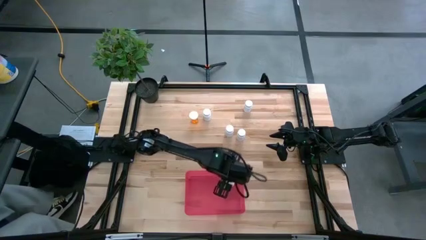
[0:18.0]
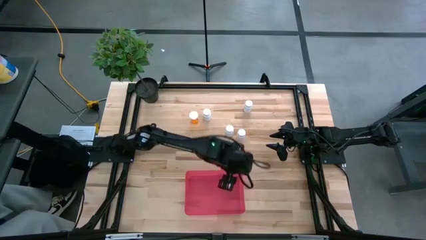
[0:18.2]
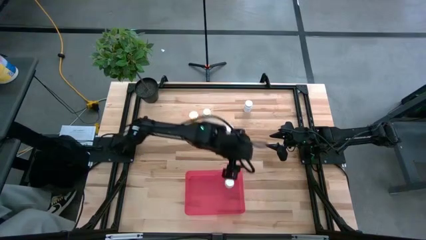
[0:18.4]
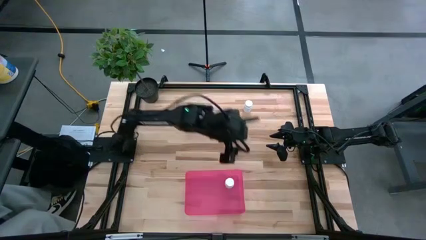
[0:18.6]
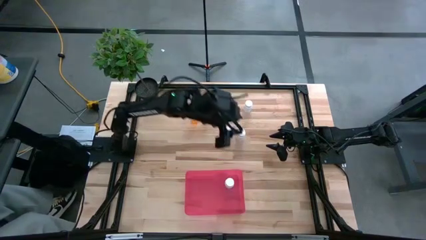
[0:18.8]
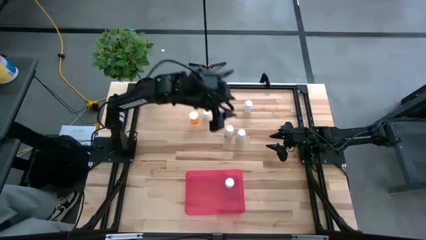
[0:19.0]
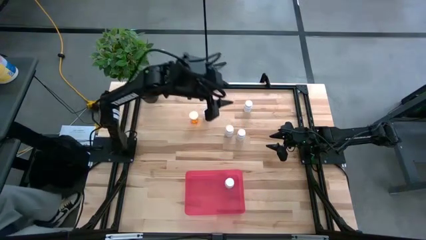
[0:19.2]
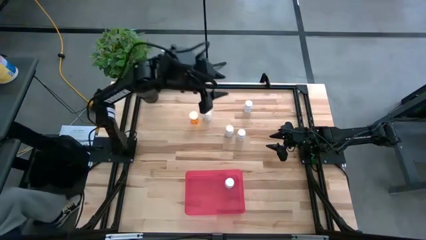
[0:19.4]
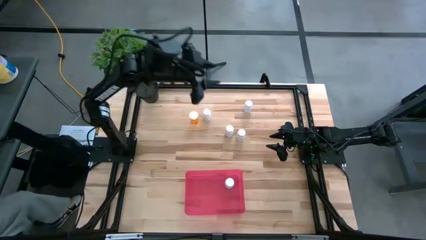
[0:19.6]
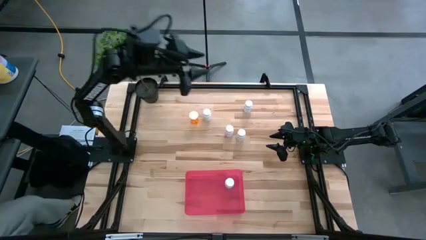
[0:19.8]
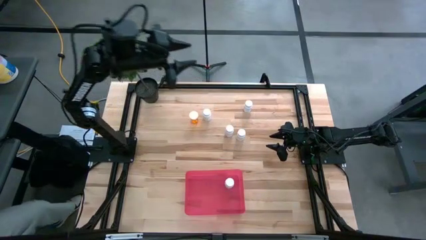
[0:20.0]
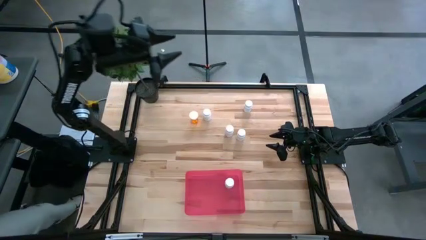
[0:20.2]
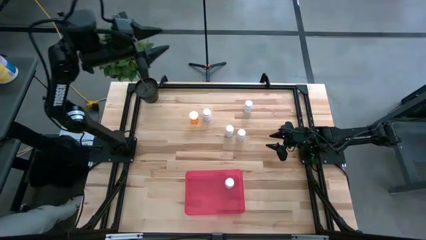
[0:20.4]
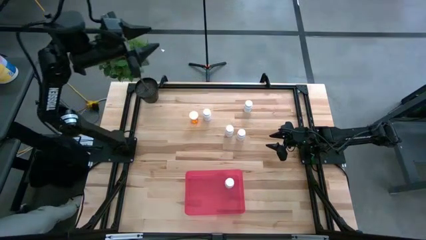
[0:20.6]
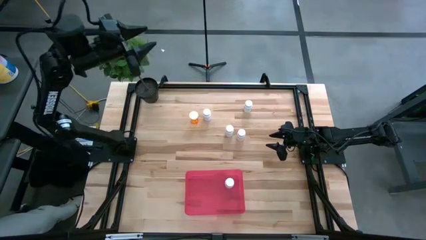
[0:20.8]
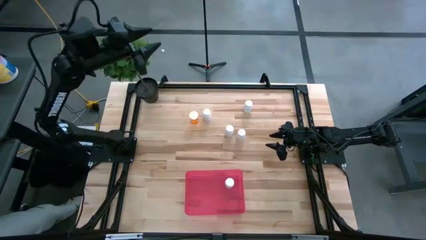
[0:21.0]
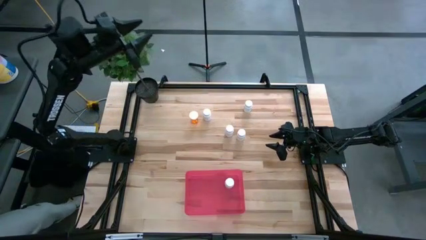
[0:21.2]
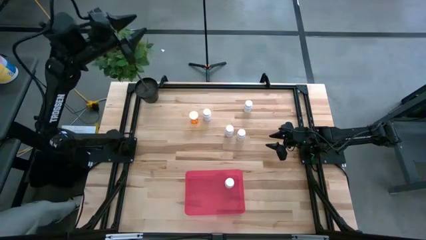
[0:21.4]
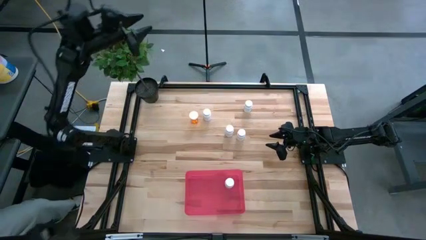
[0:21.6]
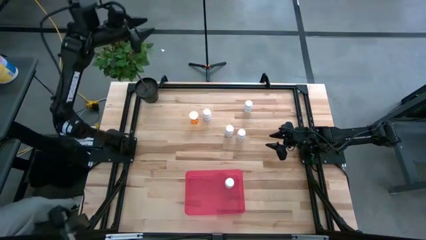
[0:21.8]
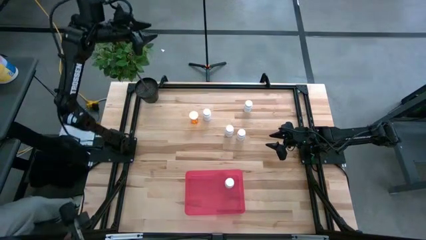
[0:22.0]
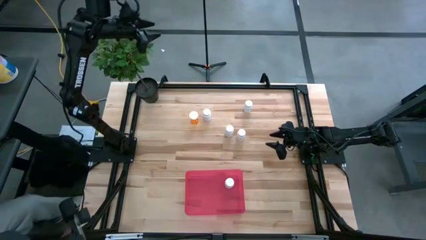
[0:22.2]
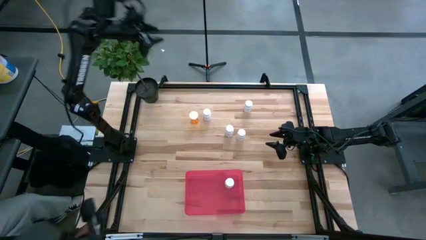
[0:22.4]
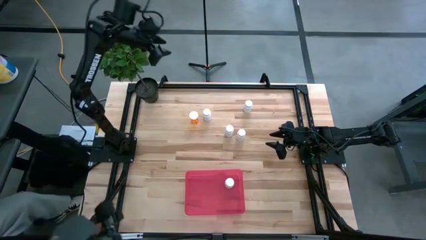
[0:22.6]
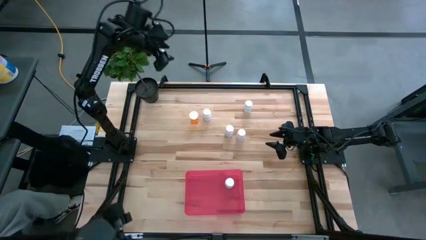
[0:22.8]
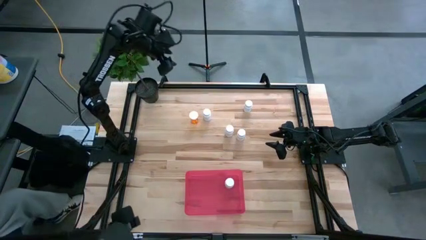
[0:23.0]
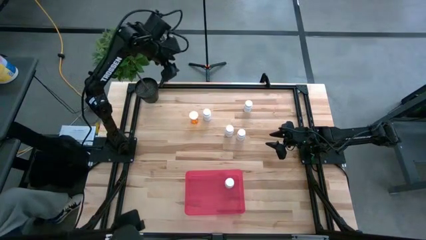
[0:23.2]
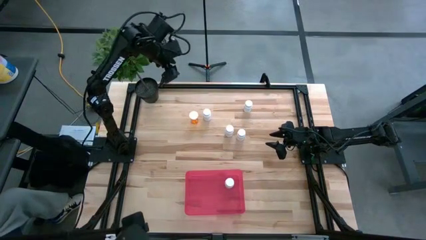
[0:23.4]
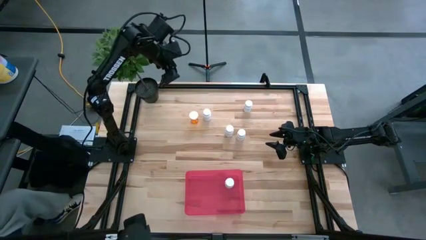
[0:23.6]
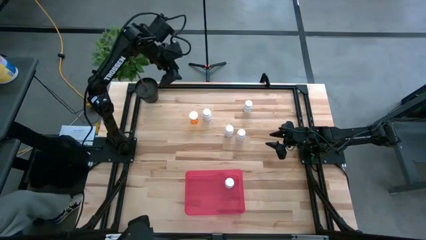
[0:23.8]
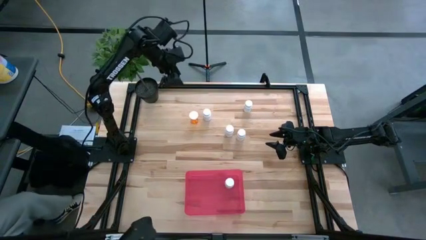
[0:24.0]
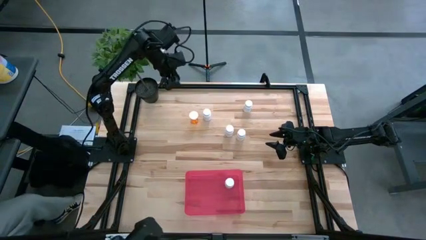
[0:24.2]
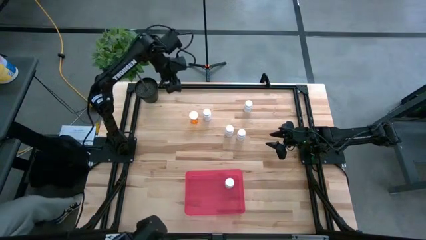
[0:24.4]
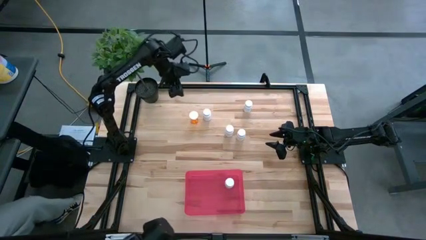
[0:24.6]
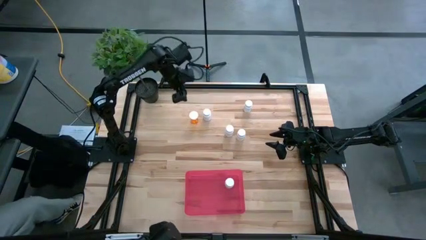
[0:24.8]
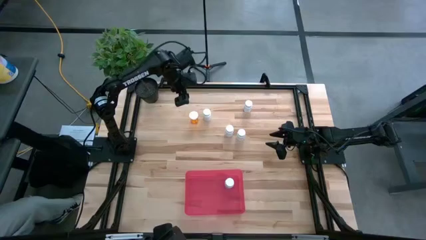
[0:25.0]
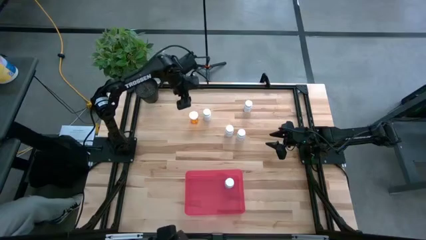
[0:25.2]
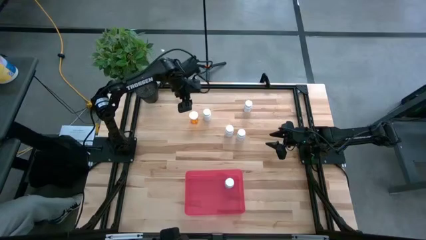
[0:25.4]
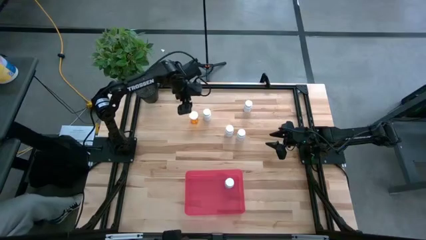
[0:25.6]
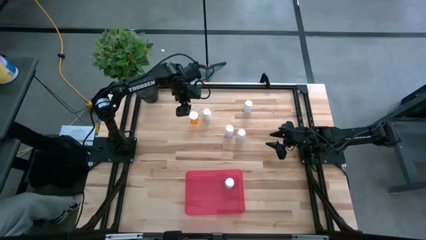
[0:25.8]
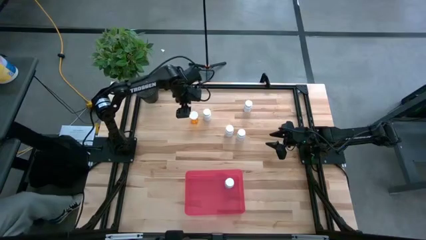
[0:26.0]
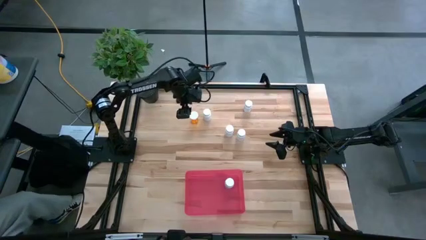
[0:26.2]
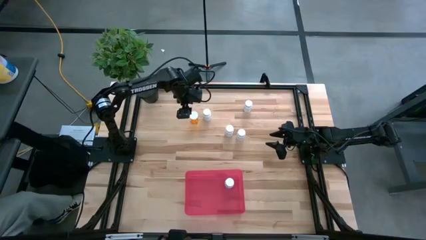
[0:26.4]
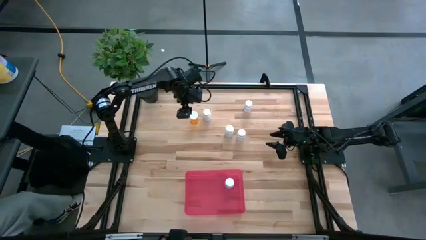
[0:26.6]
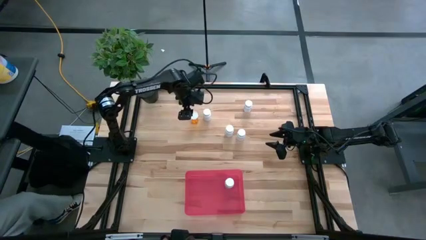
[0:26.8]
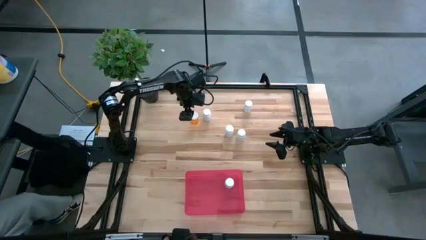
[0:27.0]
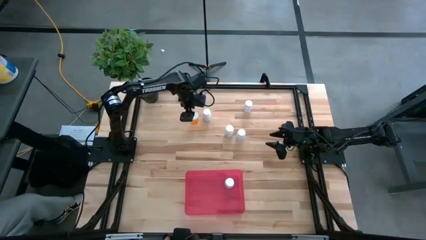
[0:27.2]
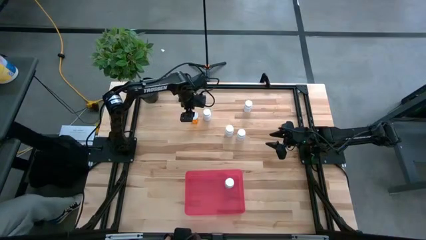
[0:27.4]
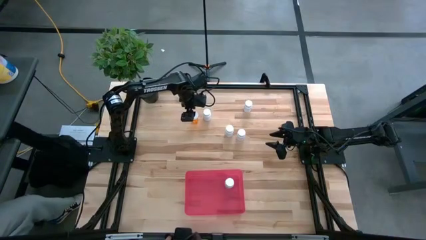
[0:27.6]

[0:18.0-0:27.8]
Task: Pick and place pill bottles into a basket
Put the orange pill bottle into the pink bin

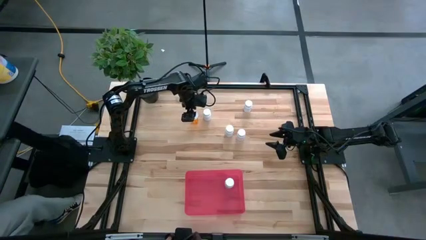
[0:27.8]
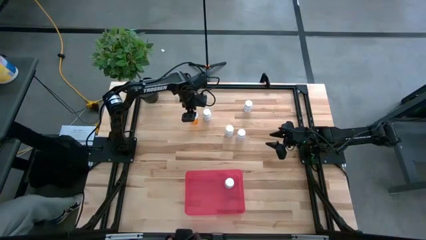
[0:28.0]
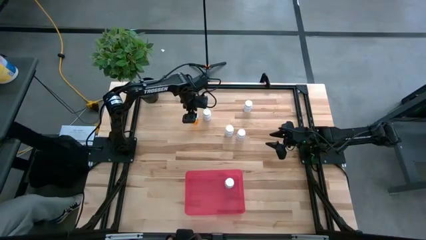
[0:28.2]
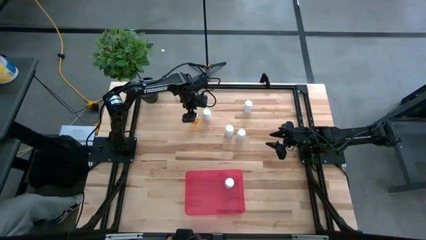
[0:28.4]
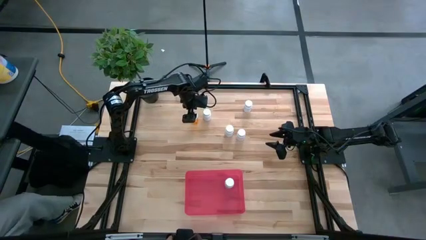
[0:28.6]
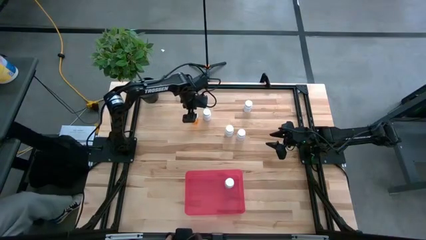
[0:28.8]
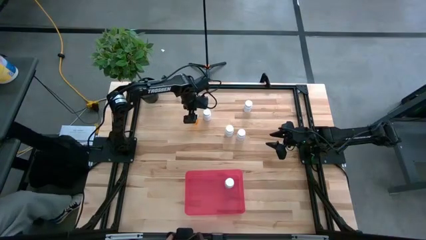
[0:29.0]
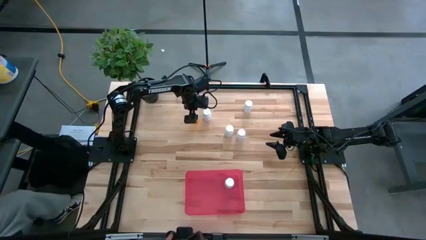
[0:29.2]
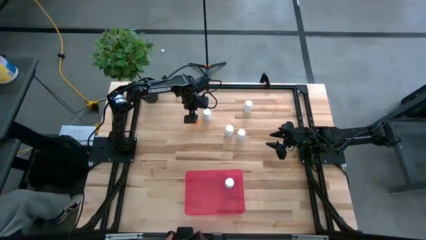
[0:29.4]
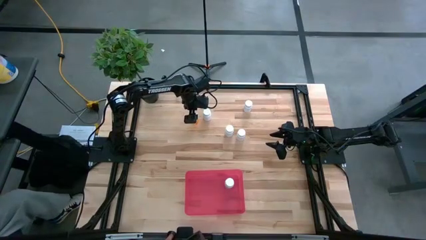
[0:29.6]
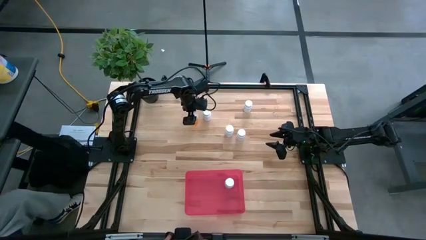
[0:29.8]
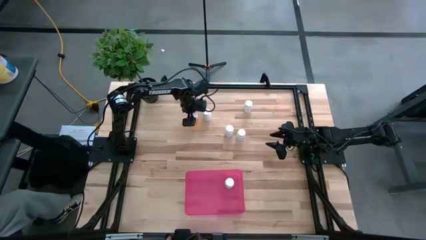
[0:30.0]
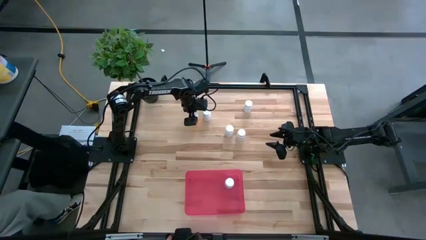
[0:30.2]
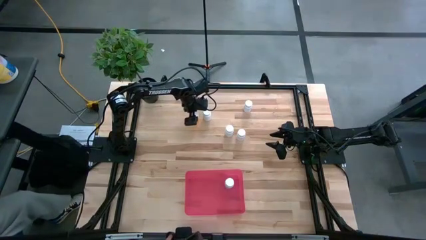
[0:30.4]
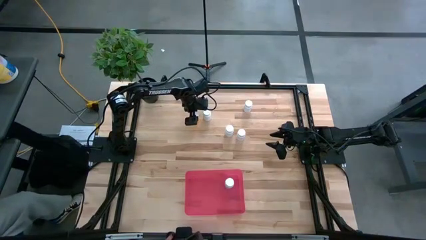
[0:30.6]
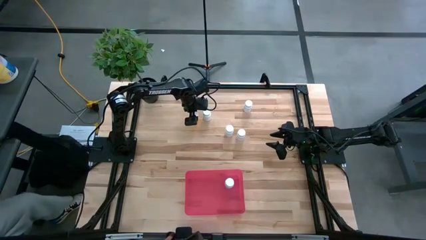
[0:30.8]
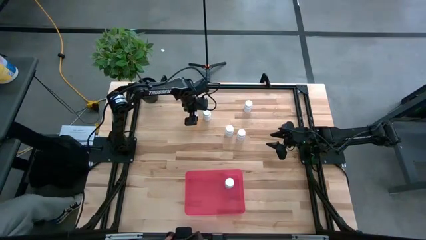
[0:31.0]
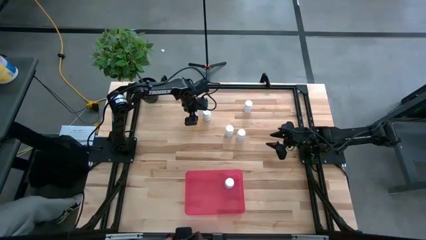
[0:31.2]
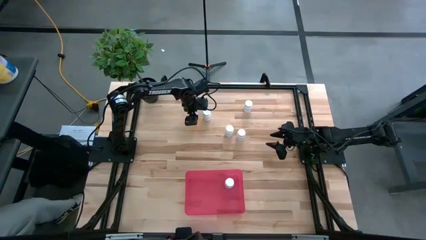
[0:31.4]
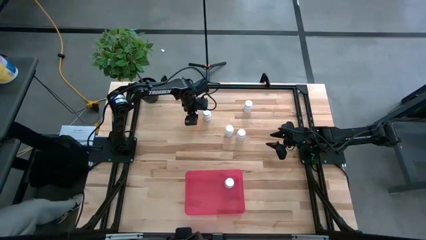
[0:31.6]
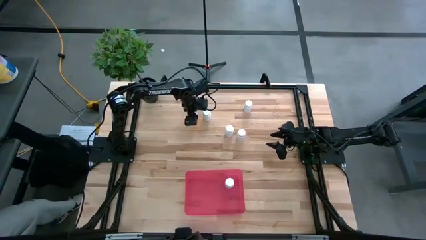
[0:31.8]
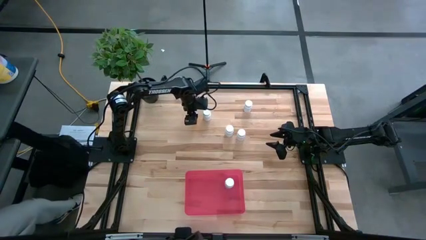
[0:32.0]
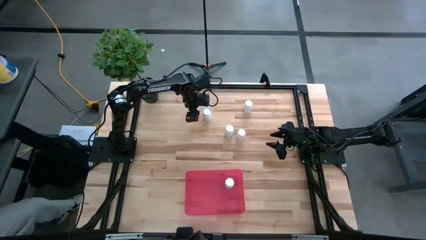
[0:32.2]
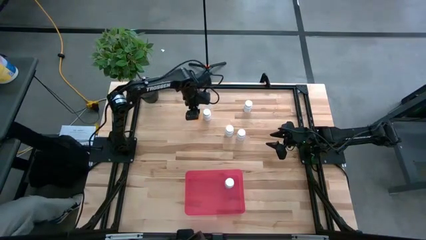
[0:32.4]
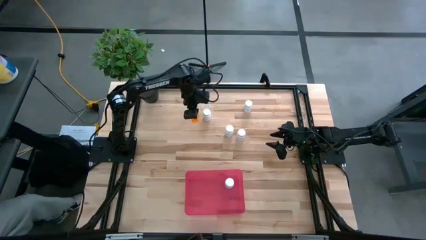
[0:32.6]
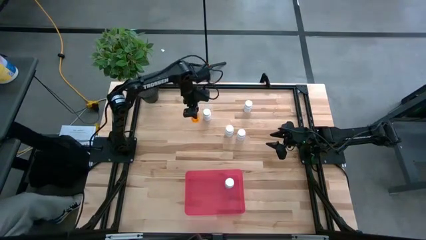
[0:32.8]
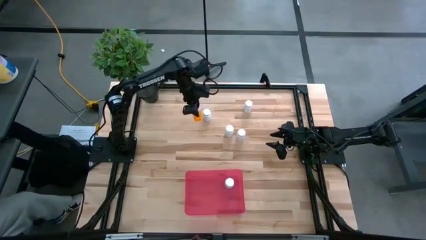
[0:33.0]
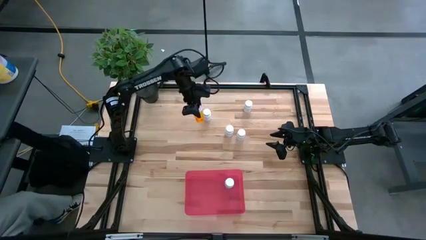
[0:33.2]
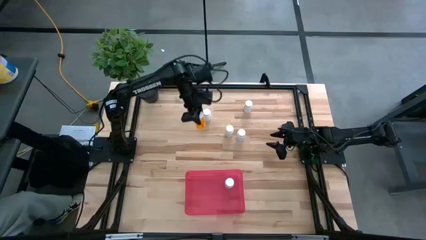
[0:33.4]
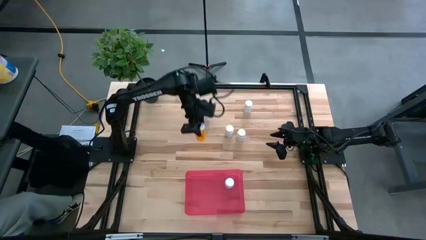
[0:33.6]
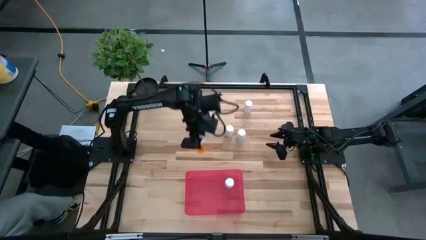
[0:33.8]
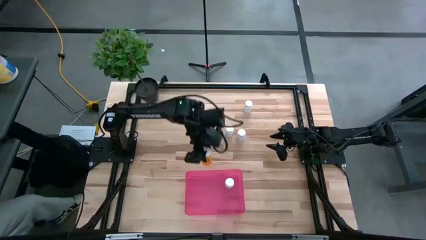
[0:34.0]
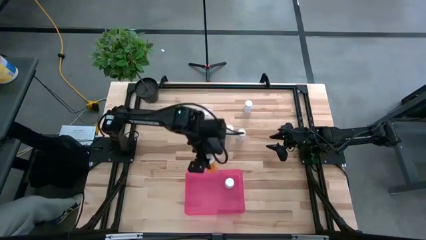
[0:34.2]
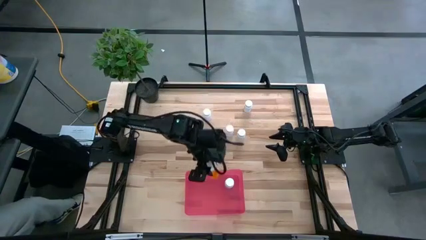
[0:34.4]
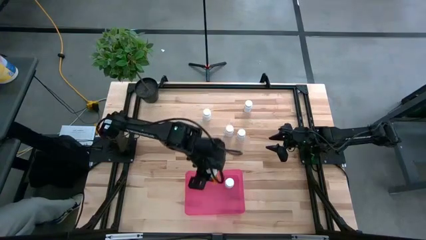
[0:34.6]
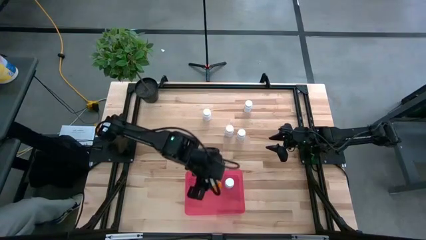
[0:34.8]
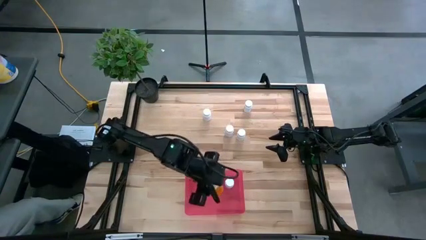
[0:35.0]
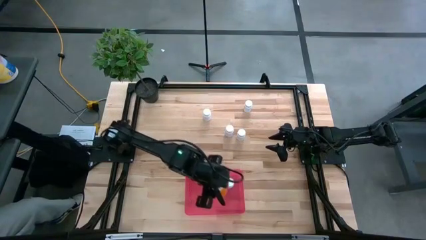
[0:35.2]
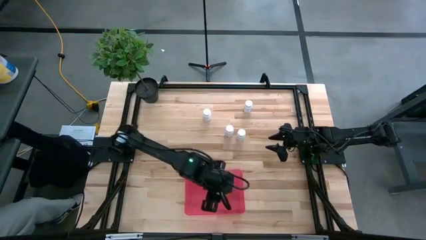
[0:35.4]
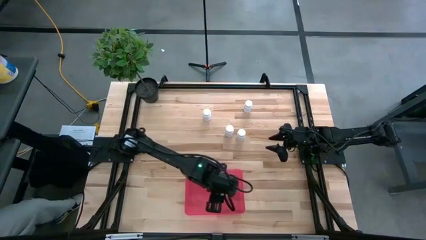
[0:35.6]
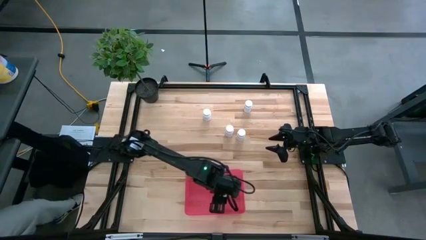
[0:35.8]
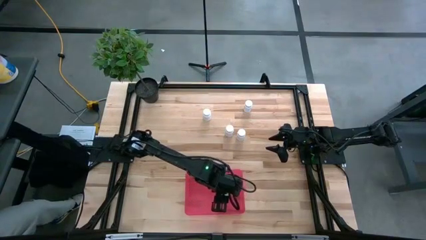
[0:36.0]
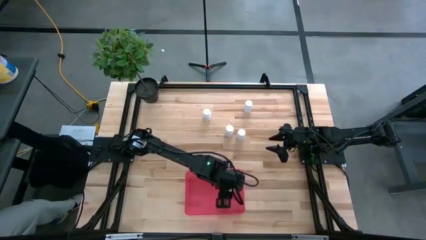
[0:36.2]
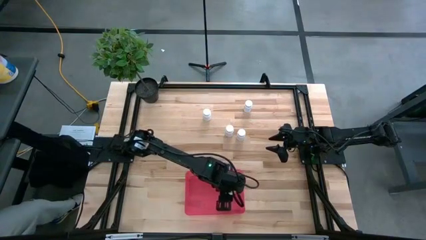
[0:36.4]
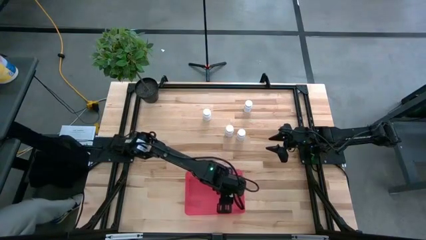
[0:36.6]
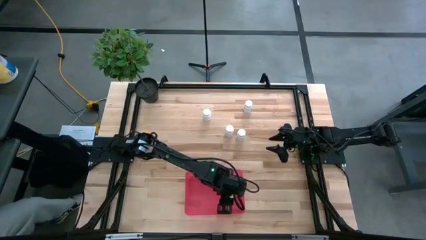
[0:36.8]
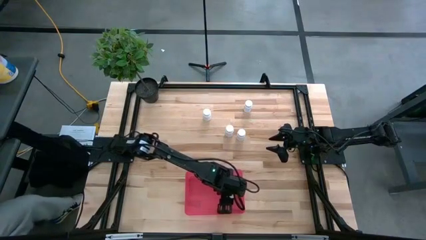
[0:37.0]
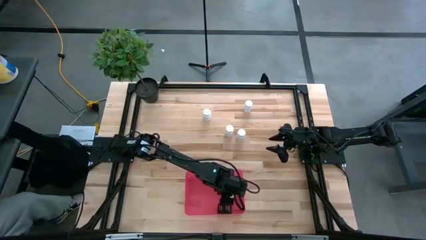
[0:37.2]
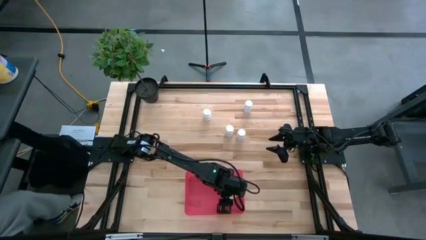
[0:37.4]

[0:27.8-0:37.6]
Put the orange pill bottle into the pink bin
